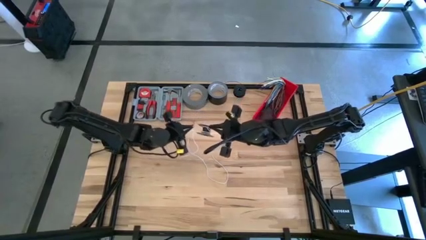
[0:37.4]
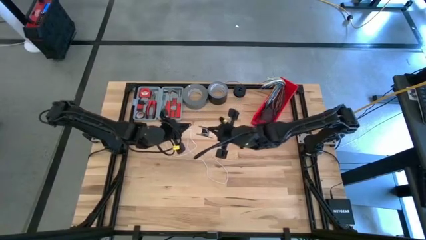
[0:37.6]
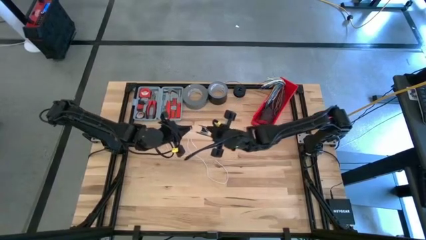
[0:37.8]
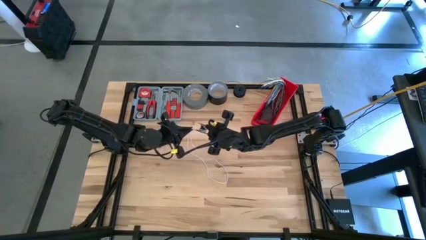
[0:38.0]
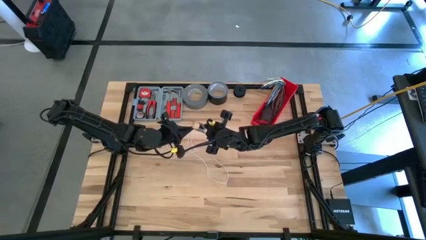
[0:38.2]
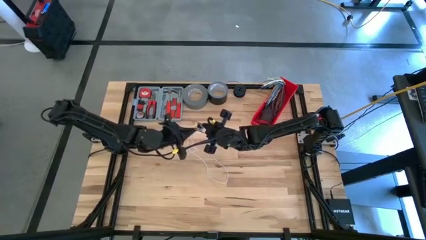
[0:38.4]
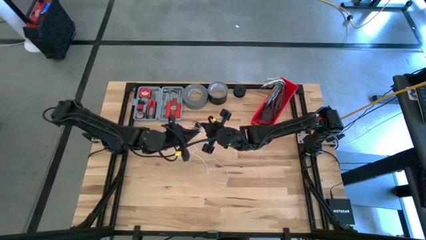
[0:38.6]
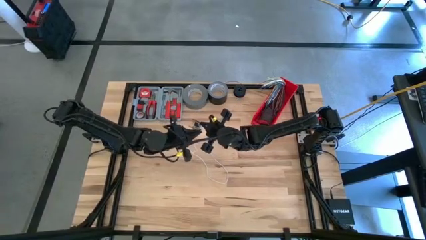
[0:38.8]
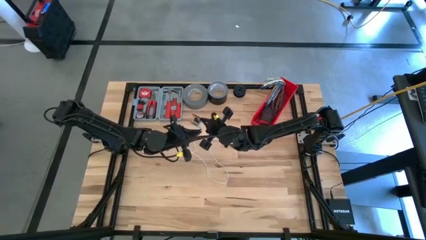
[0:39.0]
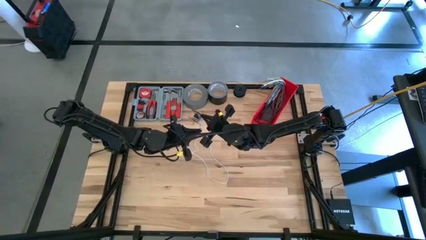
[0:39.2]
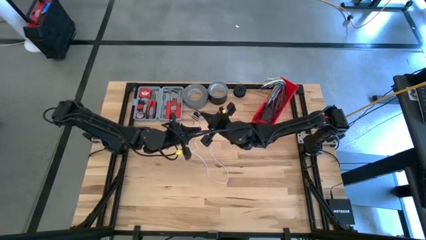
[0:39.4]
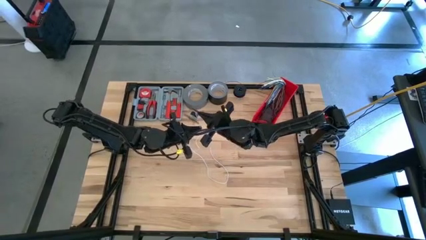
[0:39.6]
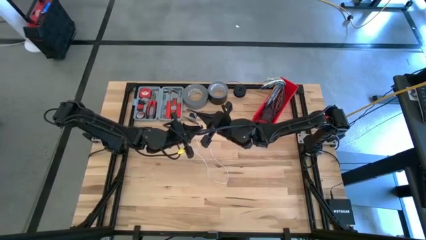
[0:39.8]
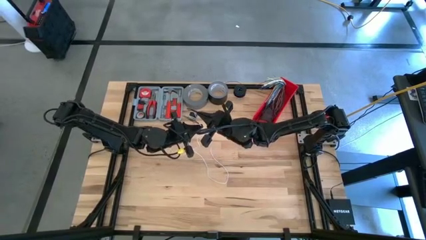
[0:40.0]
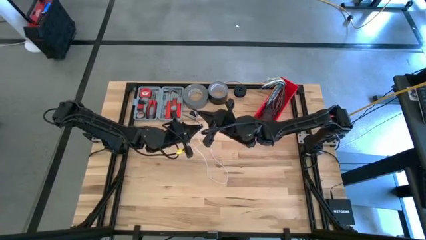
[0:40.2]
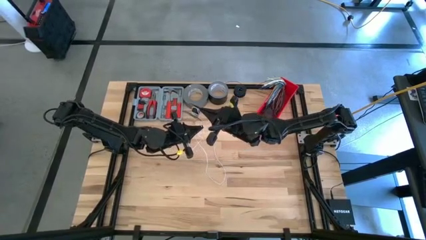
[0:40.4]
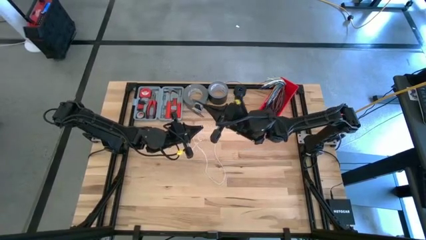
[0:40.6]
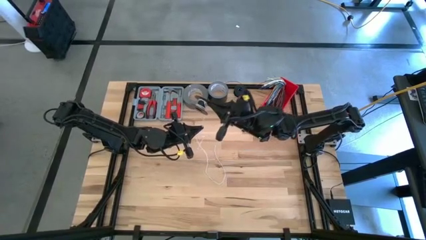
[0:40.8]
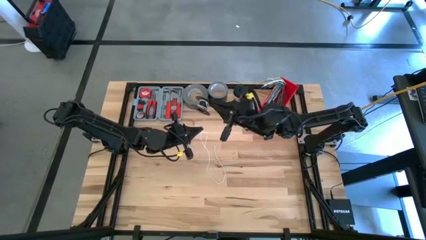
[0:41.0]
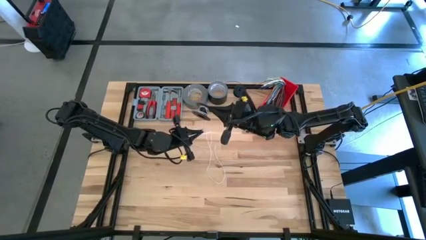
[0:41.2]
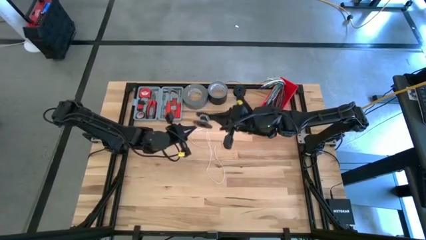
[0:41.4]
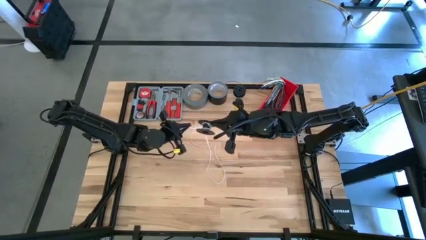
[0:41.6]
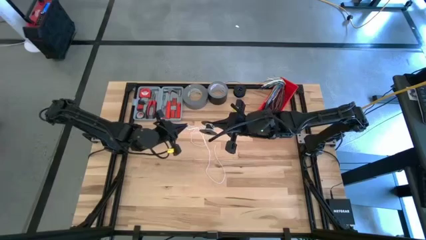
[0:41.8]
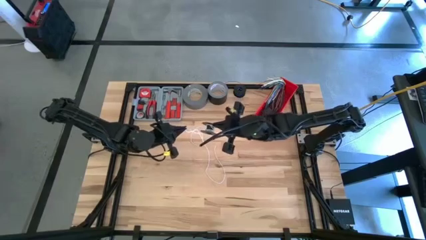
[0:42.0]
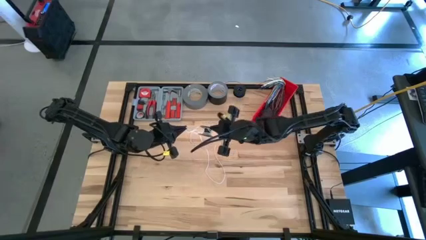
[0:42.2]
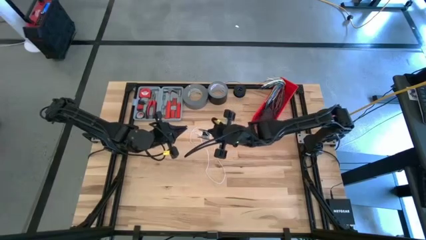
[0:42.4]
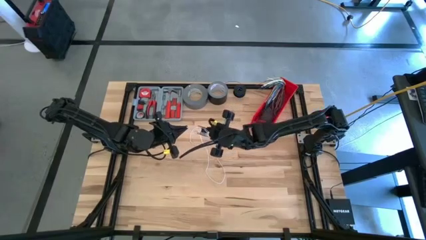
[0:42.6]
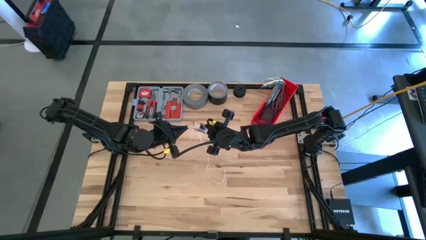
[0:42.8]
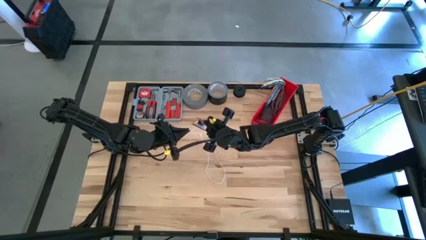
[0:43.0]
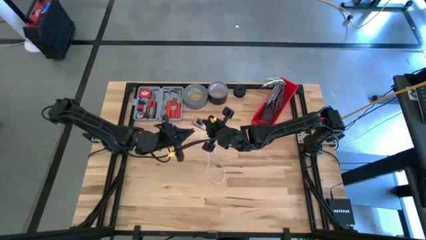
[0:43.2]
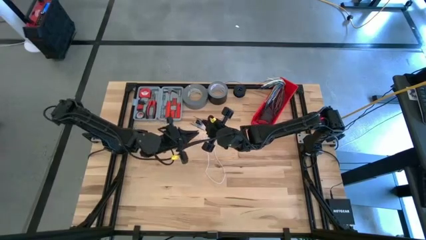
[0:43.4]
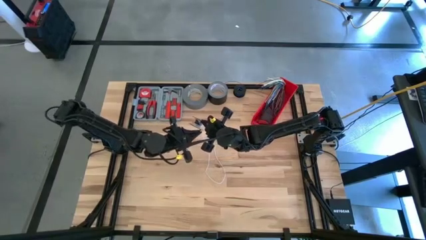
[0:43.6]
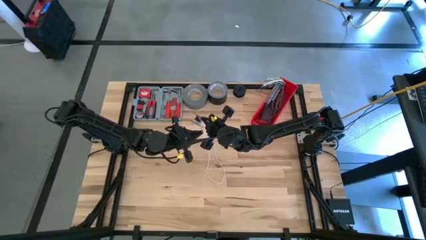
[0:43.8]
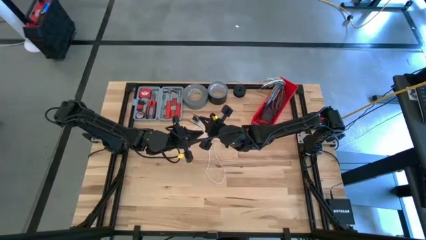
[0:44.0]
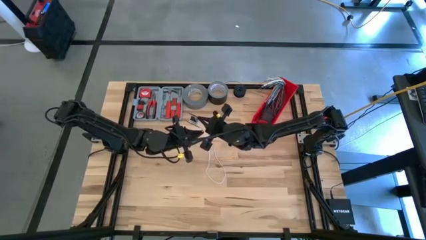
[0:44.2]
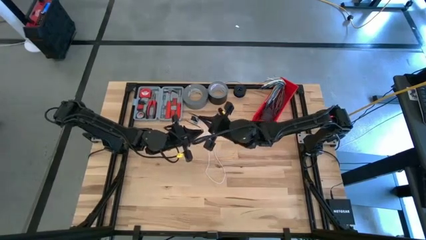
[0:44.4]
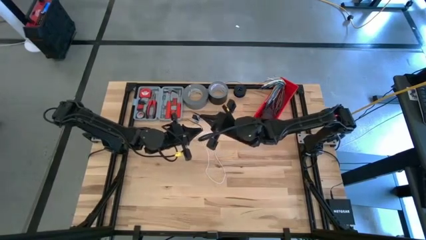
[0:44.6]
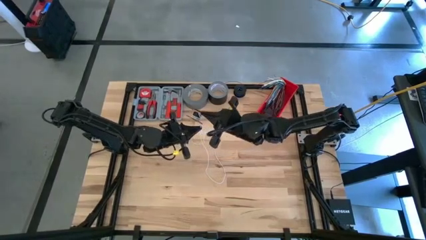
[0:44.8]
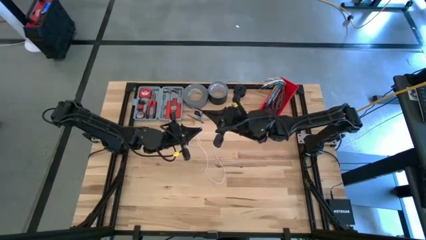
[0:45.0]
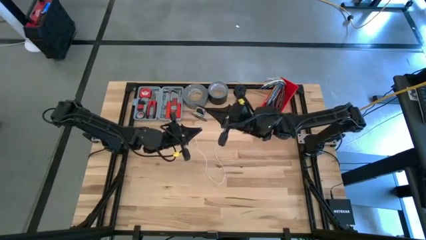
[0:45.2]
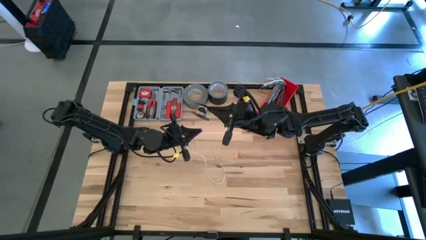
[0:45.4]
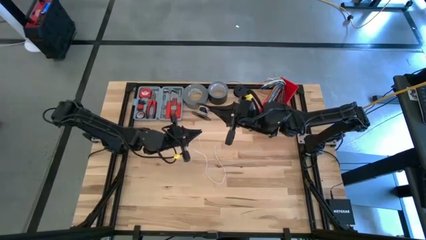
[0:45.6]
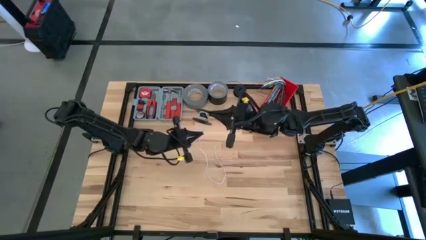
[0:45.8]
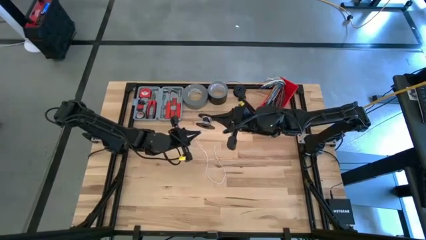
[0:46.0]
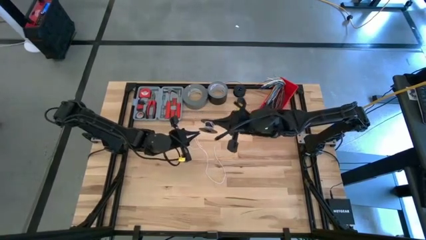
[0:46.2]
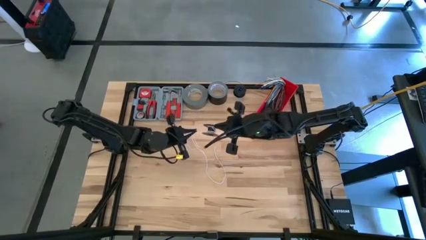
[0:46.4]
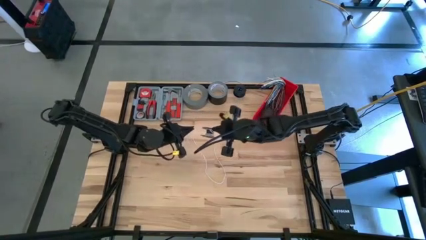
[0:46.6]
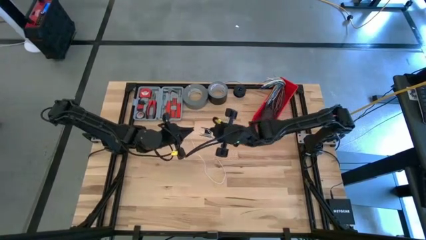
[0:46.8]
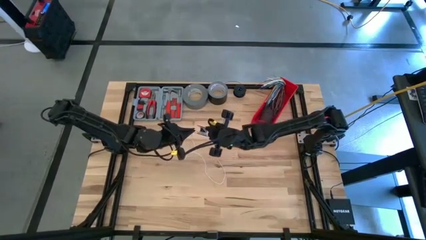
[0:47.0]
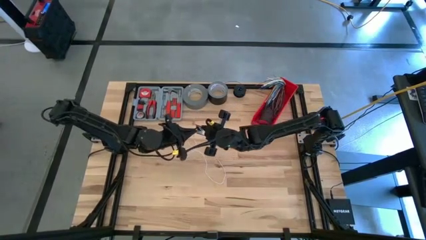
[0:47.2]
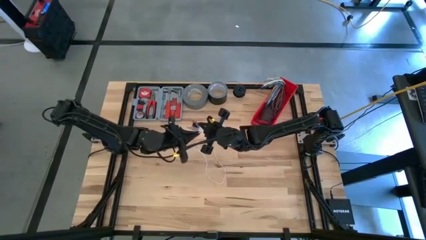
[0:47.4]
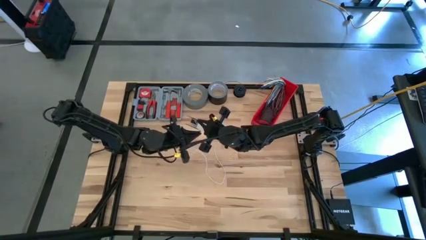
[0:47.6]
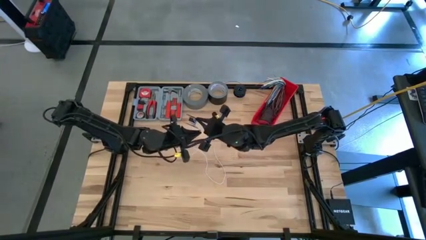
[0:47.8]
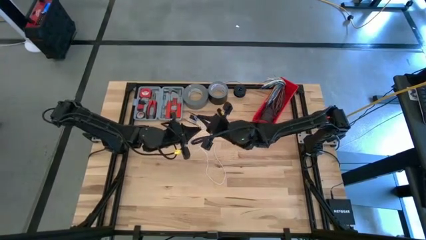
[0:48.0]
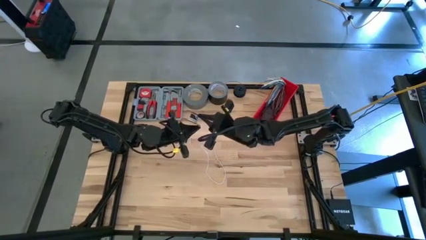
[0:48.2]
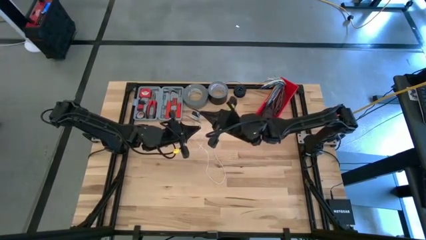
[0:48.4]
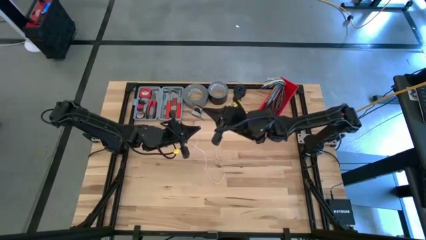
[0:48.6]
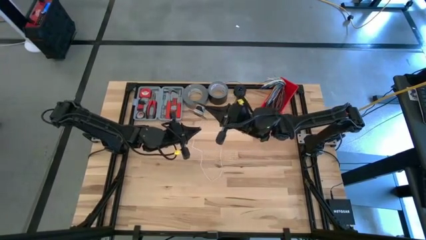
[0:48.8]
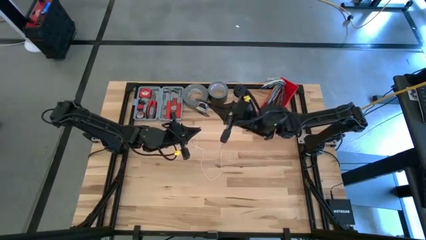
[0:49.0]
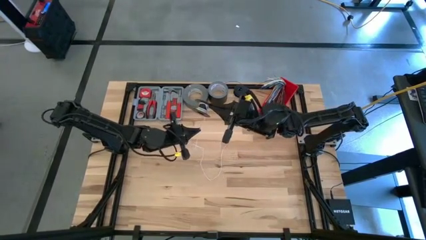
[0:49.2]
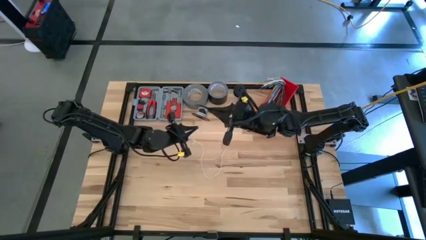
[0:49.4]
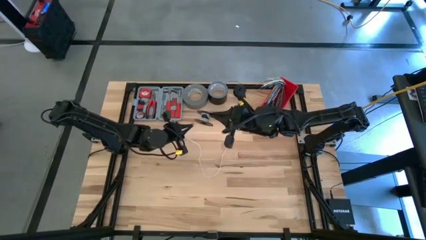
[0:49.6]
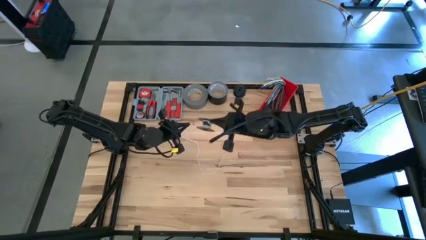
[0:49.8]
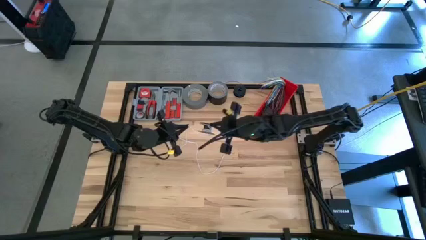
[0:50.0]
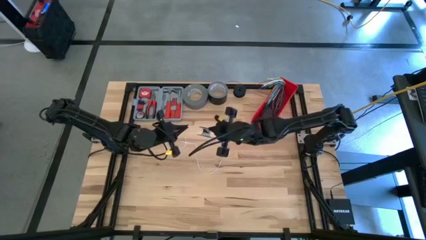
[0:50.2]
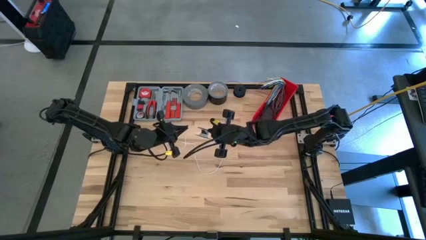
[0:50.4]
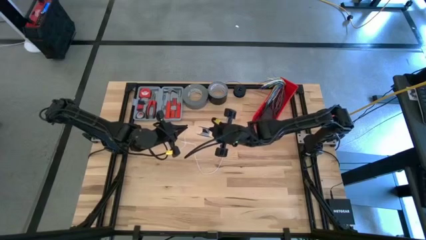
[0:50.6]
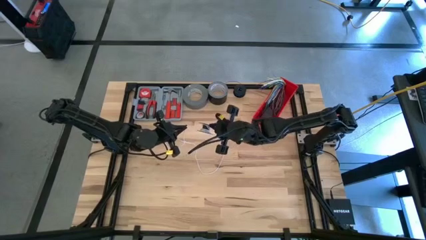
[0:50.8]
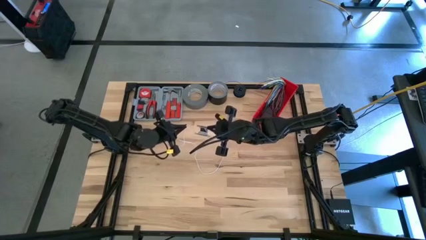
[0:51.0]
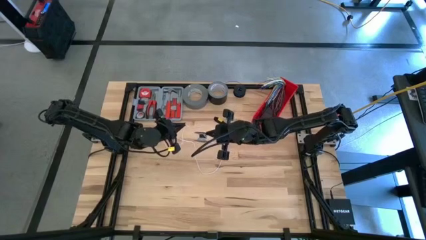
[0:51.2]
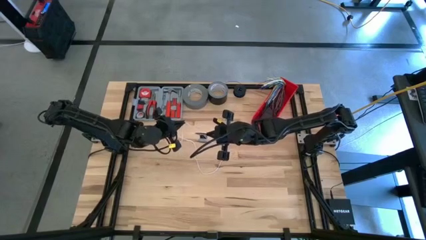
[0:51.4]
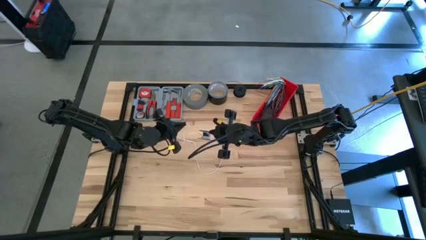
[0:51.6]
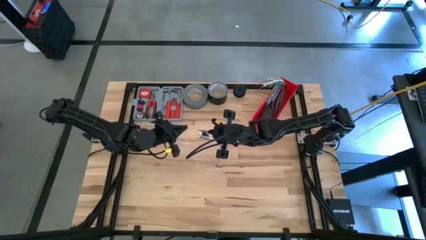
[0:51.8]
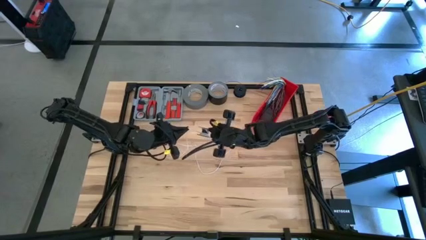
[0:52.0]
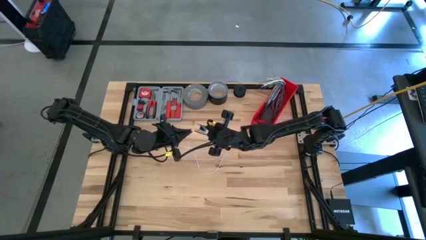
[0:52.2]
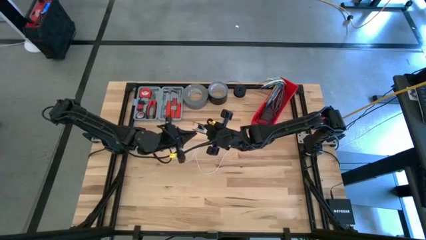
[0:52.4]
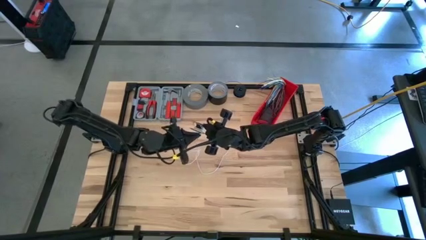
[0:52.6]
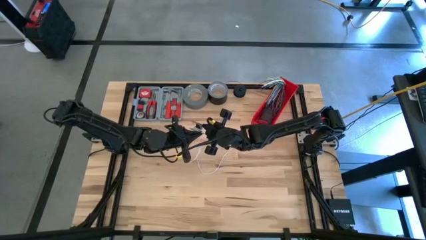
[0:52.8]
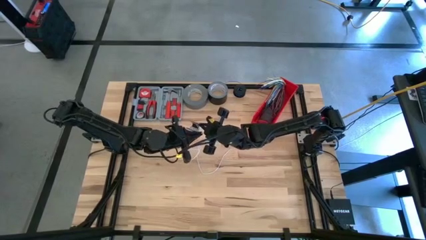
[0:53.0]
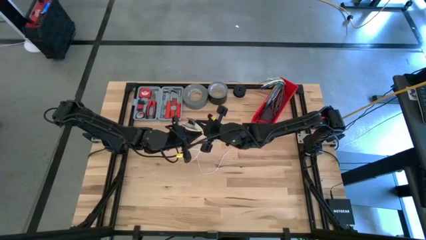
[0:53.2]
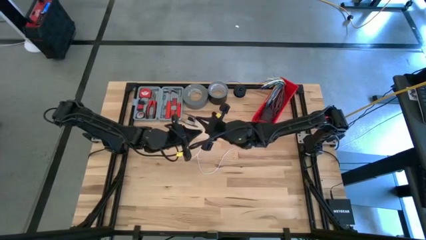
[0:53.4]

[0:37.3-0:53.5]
Task: Coil cords
Coil the white wire onto the spool
